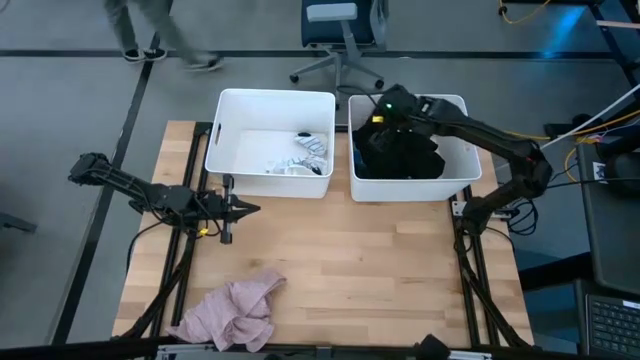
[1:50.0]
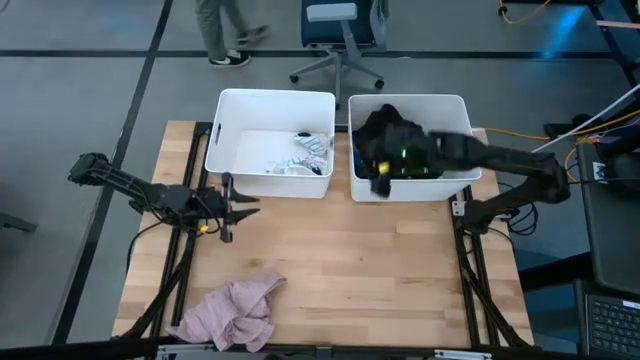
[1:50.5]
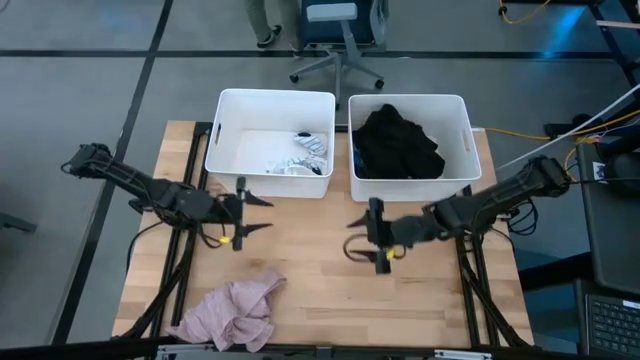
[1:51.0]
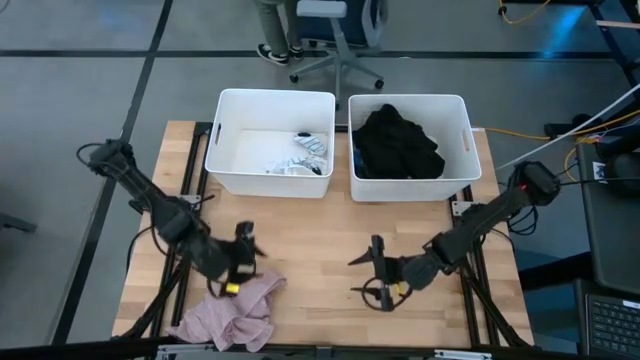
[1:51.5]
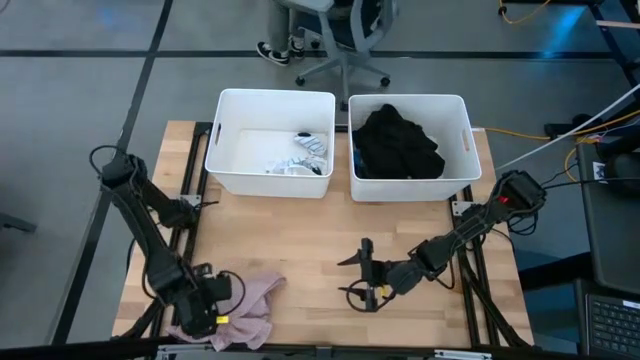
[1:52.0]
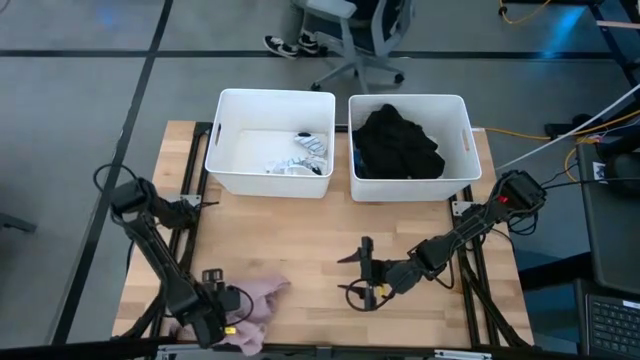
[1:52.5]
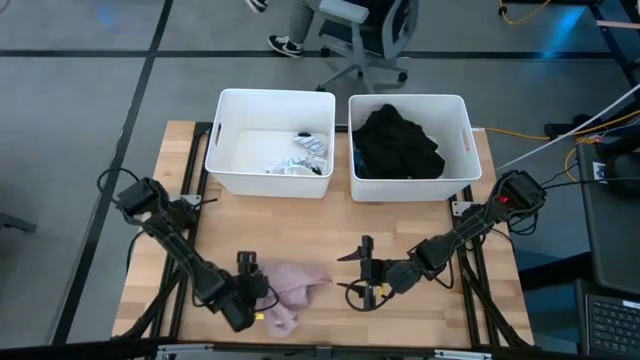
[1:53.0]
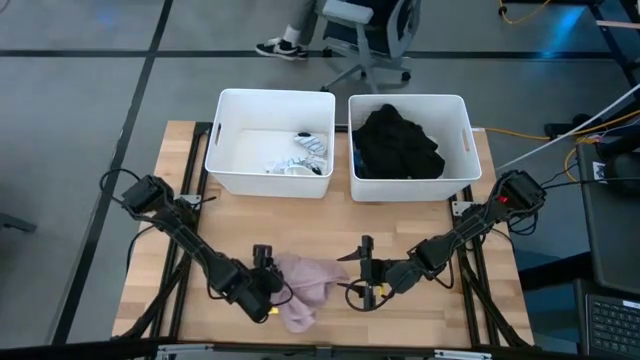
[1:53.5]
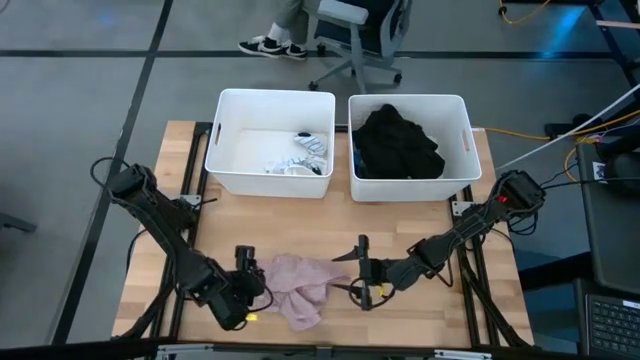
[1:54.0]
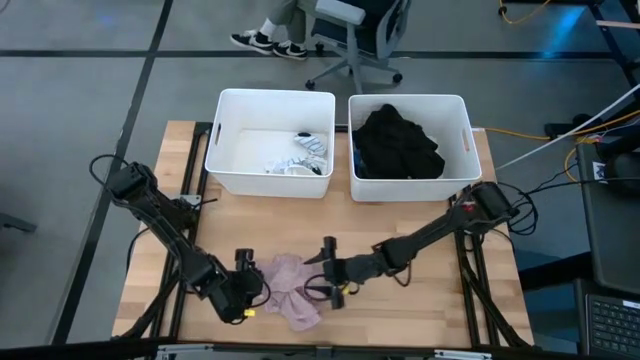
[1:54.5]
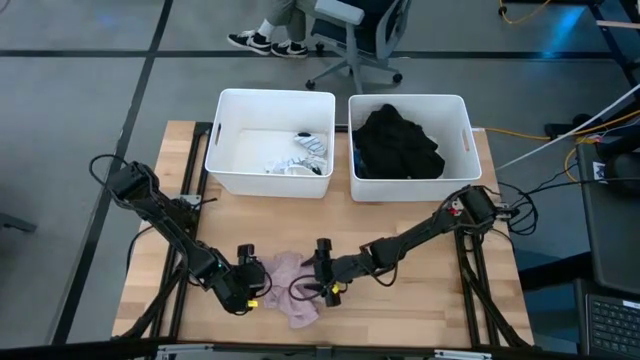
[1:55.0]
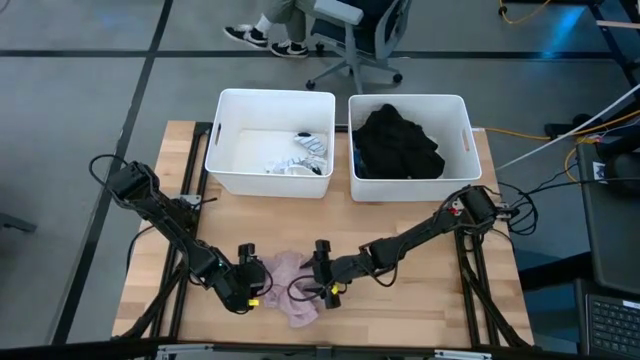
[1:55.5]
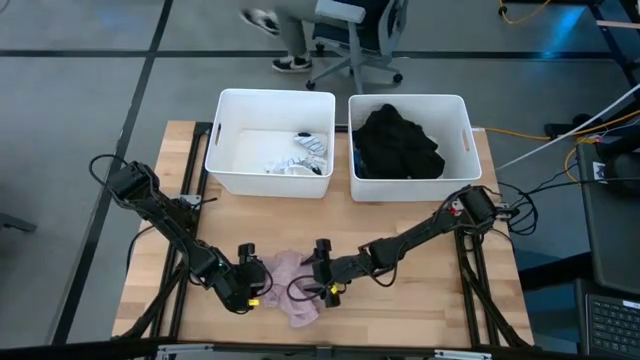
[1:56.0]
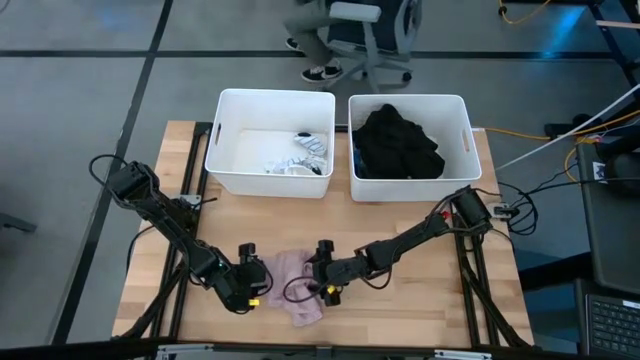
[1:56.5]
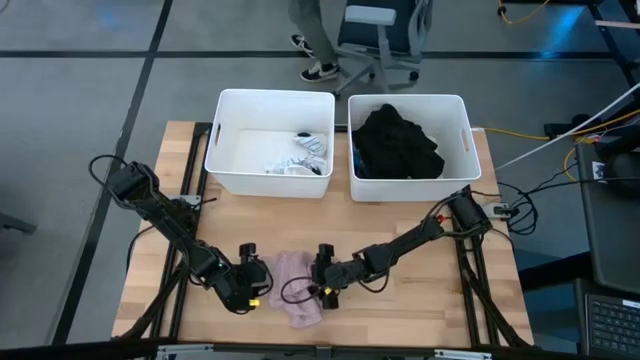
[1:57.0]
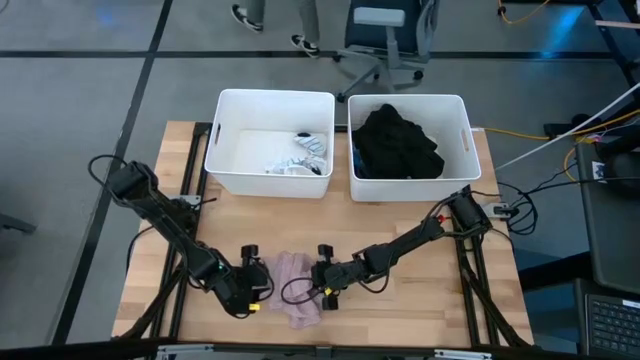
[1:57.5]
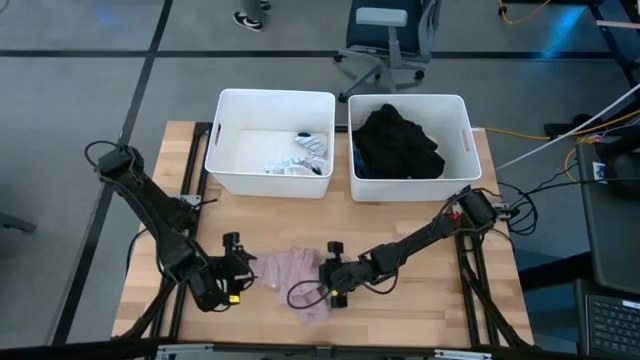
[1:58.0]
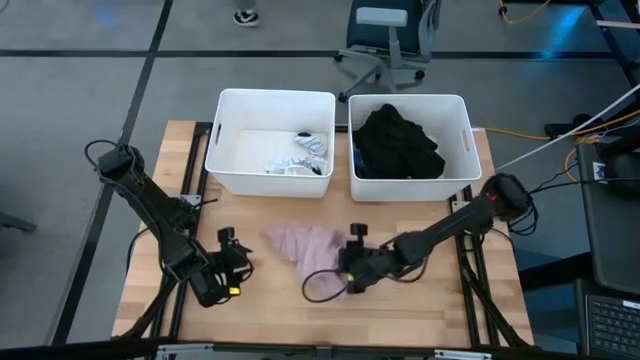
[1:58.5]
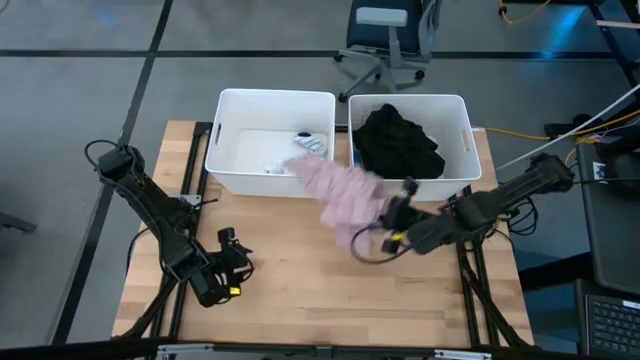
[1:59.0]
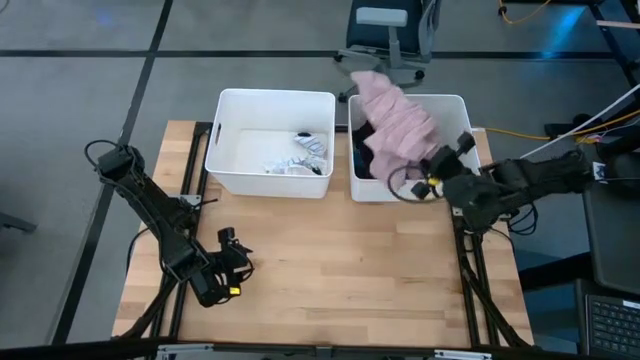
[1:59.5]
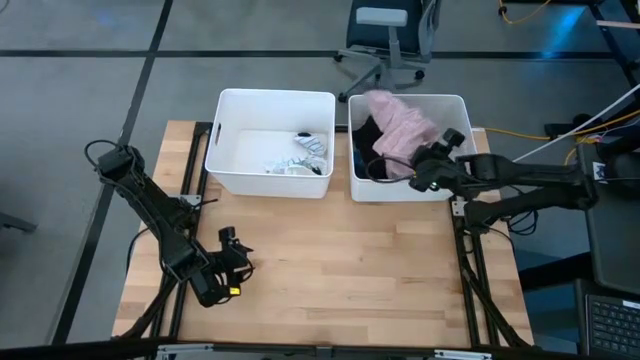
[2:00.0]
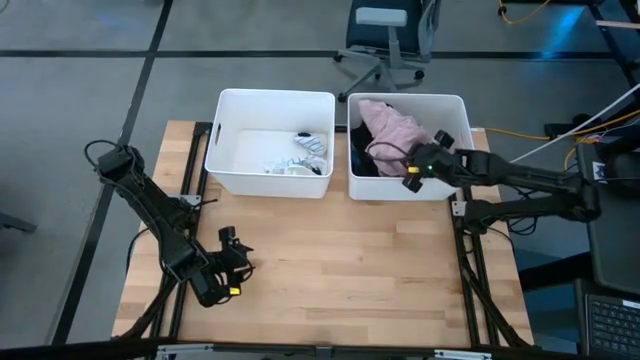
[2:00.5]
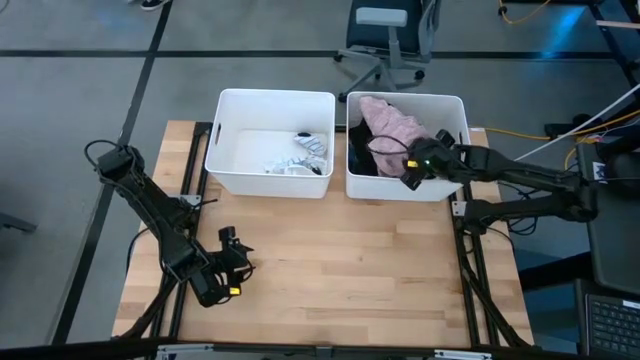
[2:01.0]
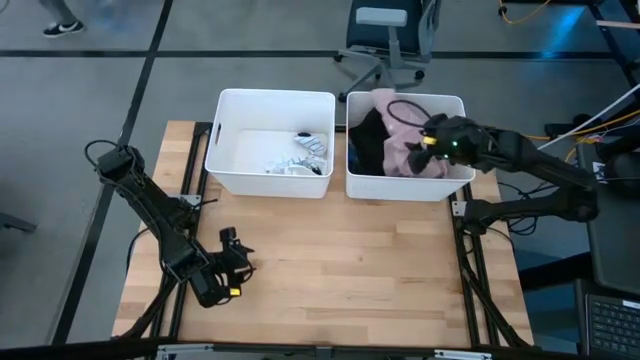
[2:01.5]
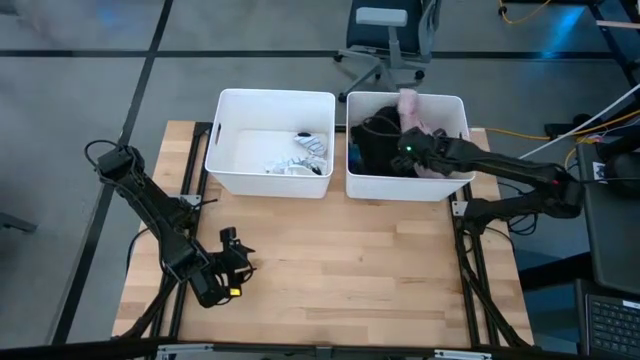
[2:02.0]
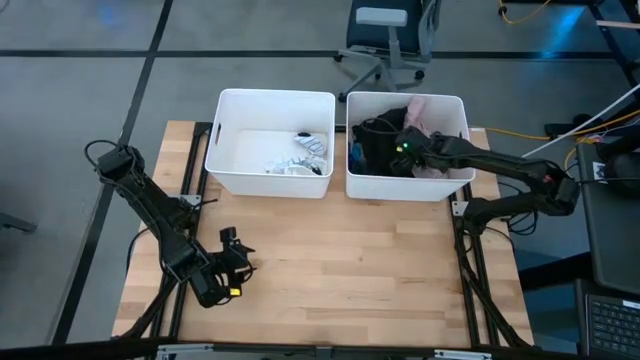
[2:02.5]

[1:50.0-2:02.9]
Task: Sort clothes
Put the pink cloth into the right white bin

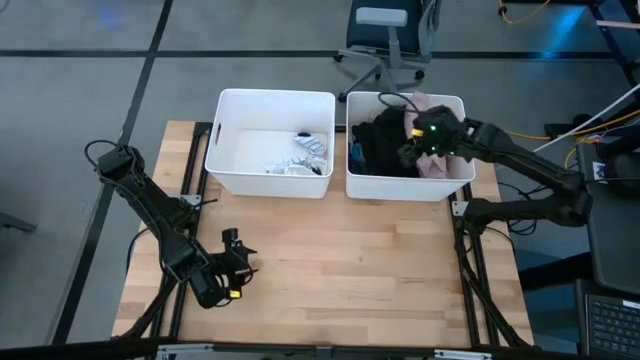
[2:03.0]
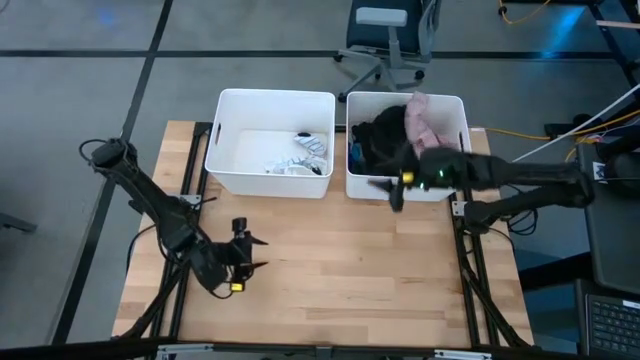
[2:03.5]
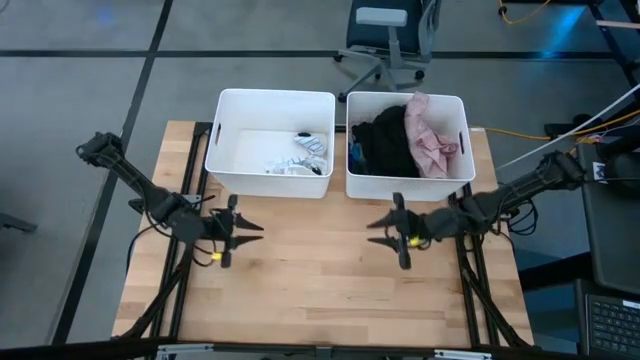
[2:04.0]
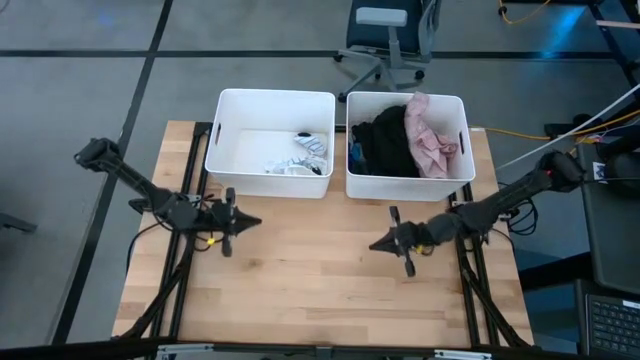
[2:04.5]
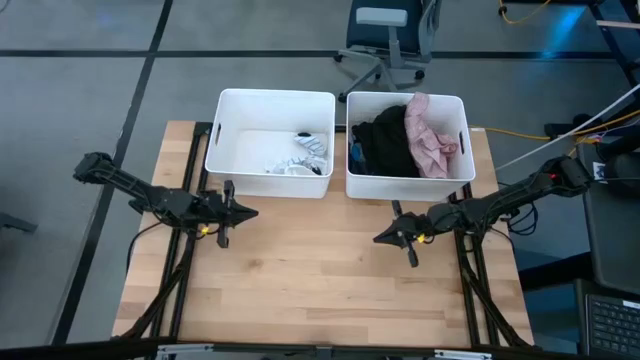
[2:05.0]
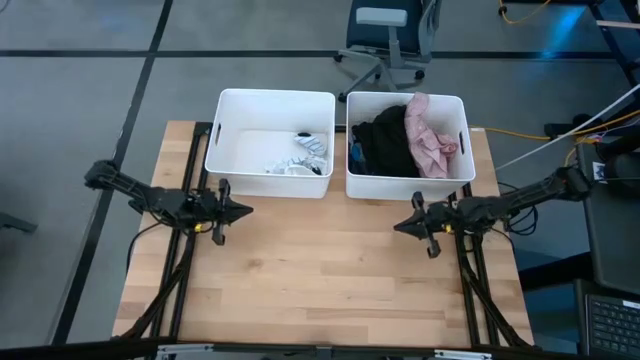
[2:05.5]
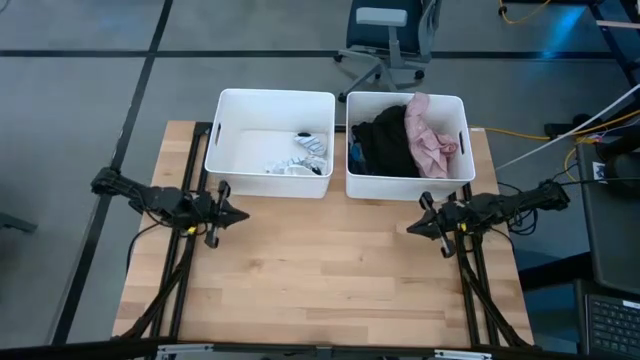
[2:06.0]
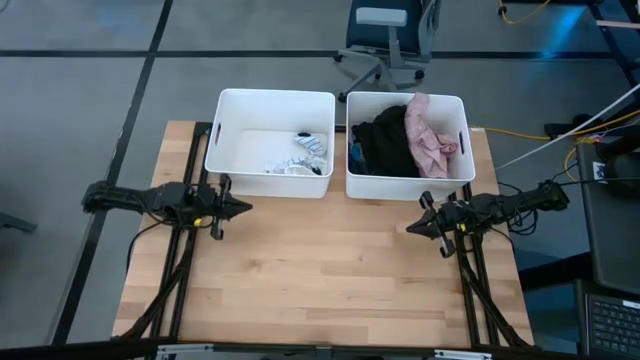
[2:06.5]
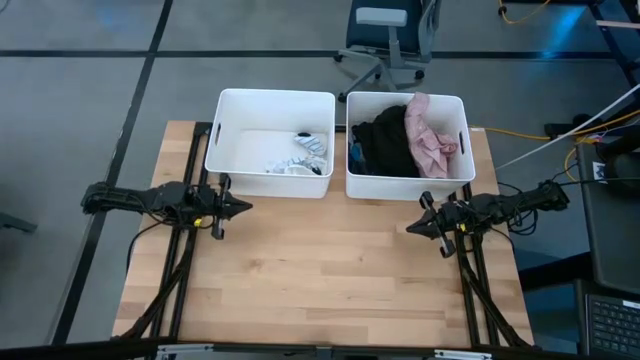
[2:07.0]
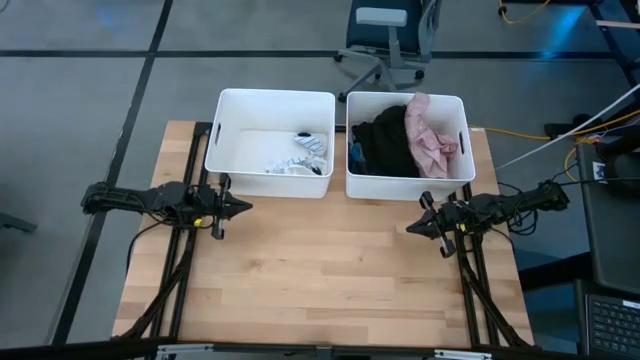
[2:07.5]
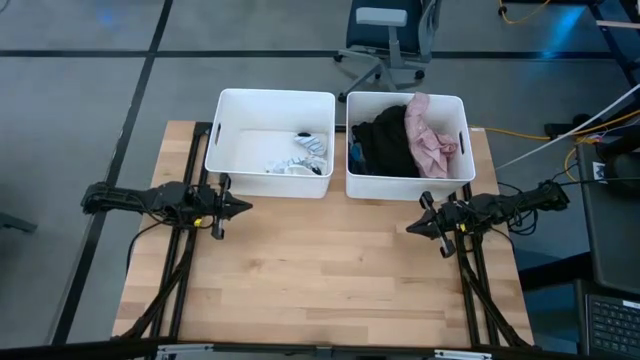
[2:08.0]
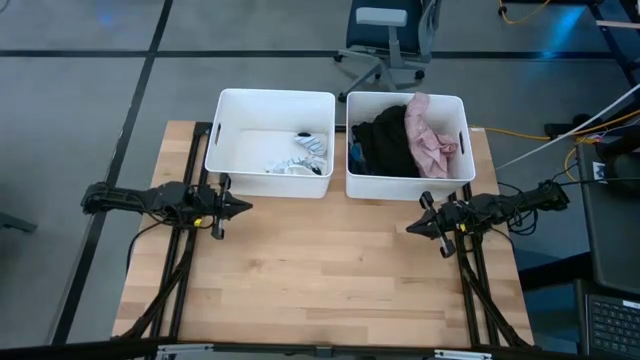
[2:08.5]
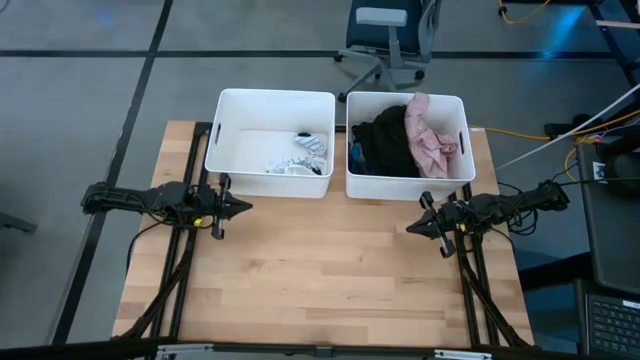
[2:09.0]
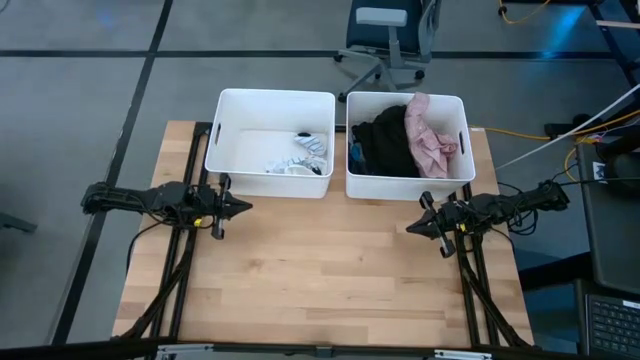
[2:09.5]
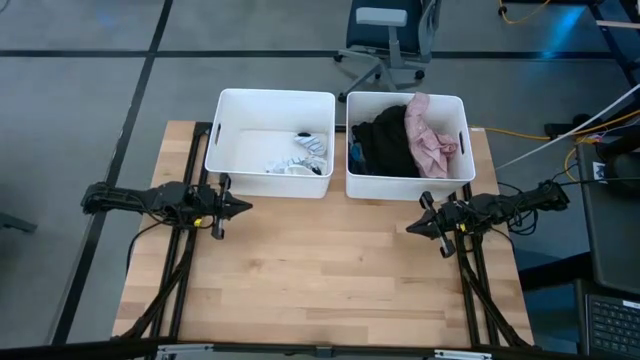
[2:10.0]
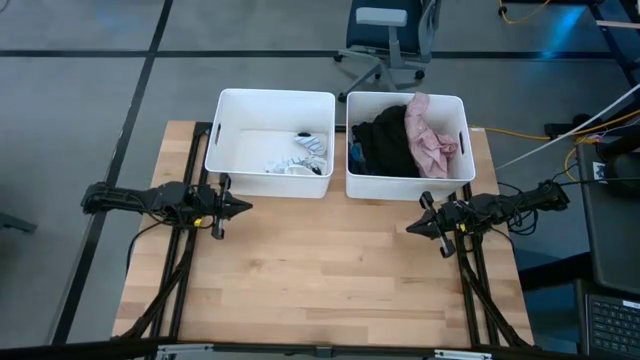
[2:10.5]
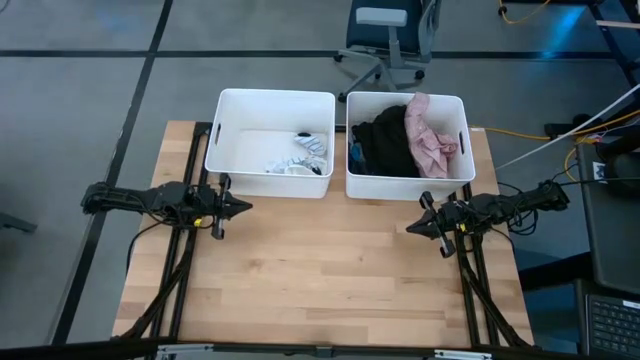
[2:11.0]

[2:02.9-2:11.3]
Return to Home Position
